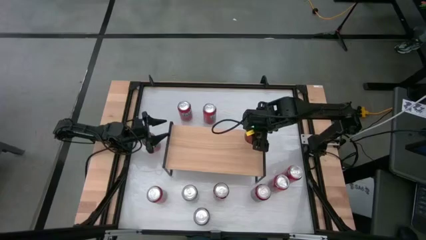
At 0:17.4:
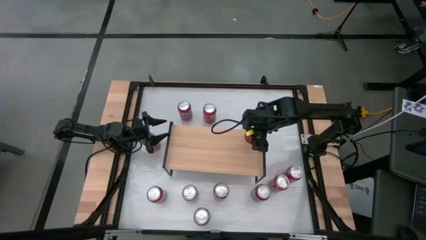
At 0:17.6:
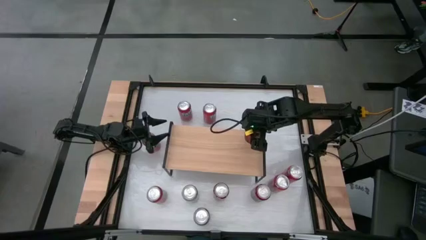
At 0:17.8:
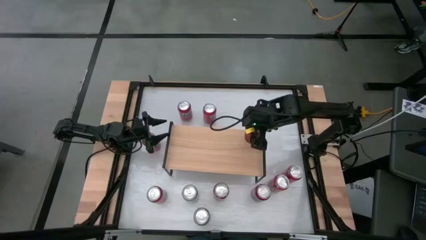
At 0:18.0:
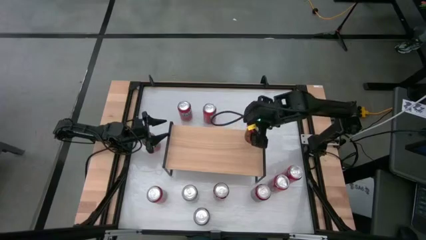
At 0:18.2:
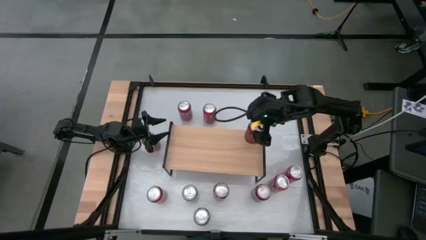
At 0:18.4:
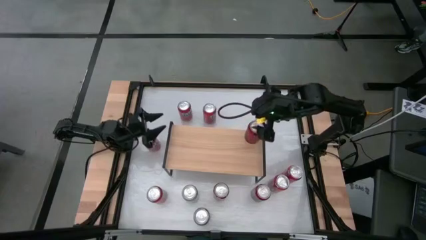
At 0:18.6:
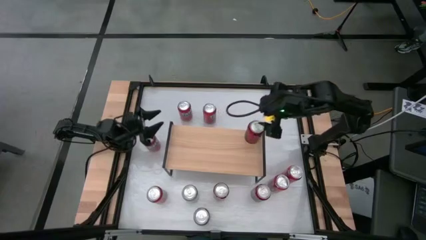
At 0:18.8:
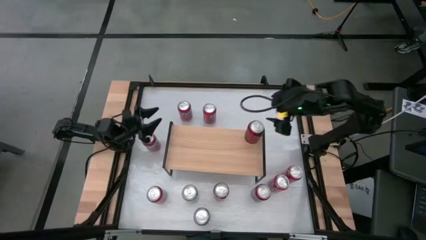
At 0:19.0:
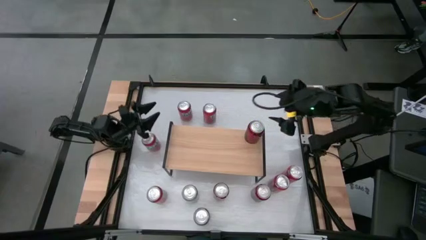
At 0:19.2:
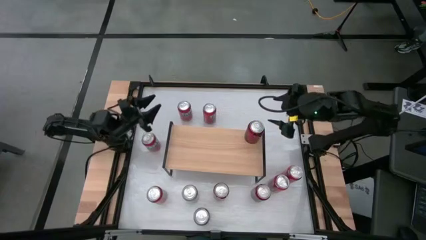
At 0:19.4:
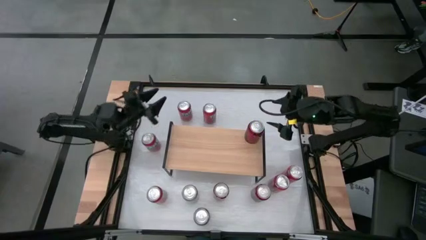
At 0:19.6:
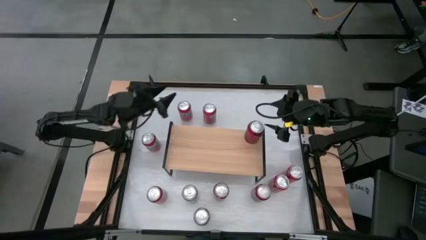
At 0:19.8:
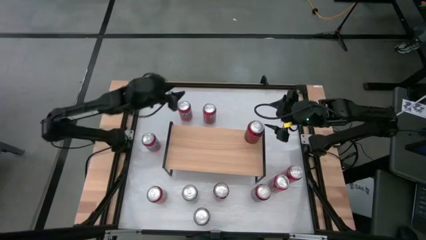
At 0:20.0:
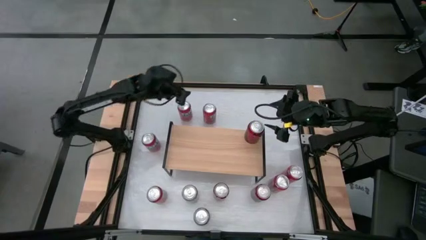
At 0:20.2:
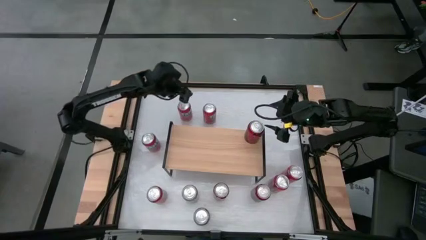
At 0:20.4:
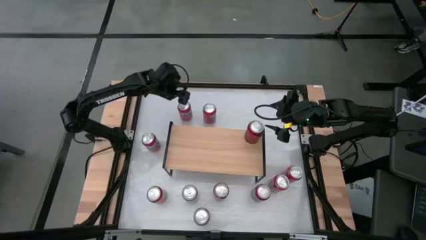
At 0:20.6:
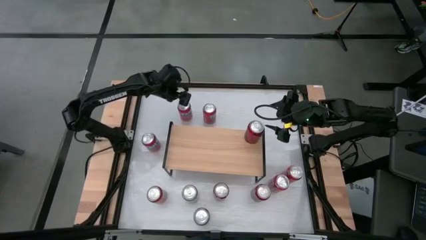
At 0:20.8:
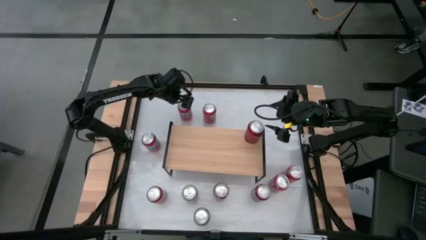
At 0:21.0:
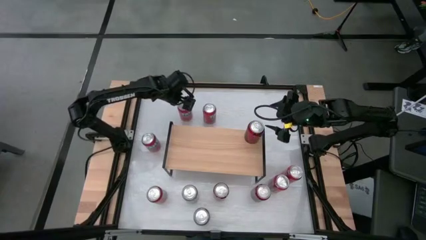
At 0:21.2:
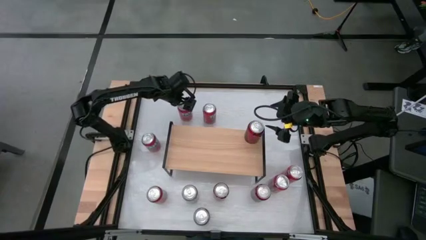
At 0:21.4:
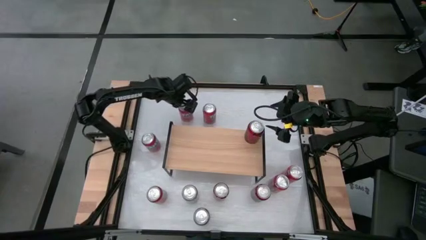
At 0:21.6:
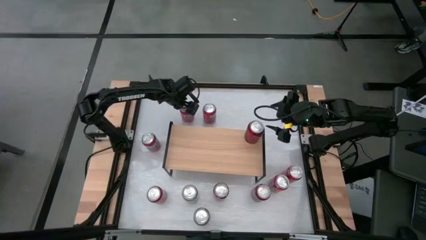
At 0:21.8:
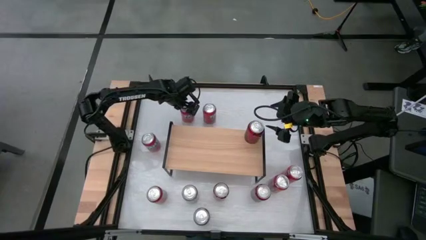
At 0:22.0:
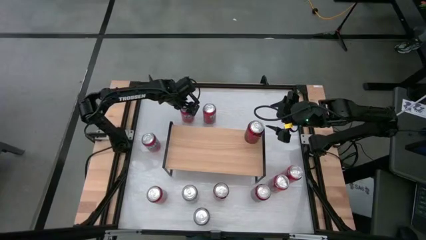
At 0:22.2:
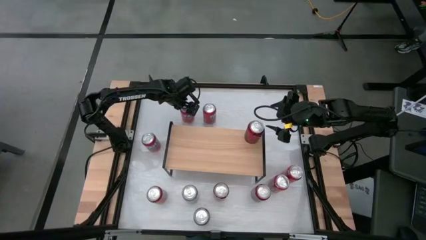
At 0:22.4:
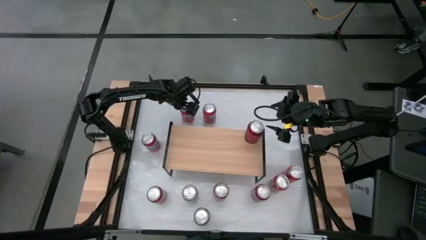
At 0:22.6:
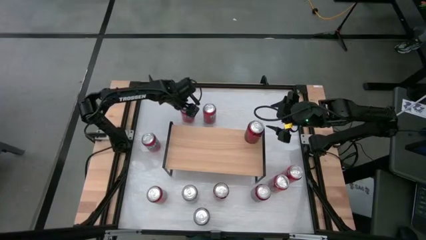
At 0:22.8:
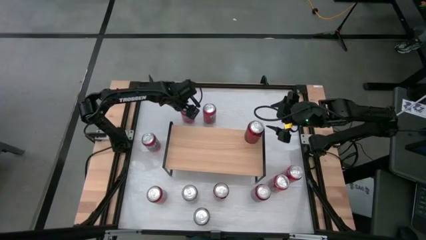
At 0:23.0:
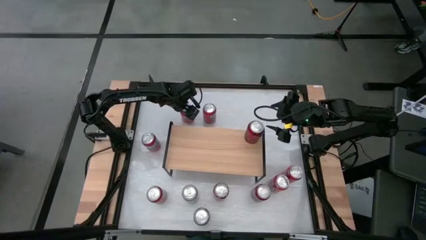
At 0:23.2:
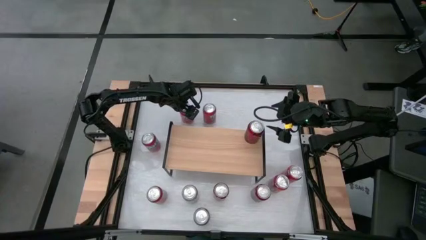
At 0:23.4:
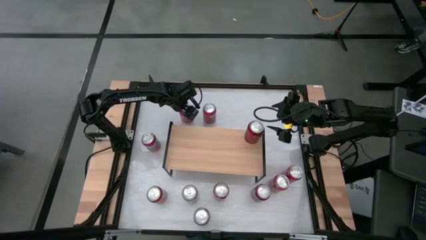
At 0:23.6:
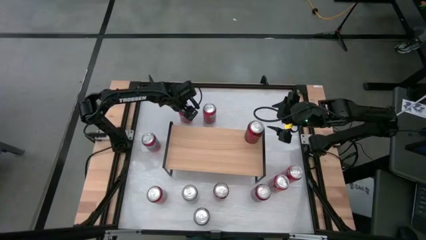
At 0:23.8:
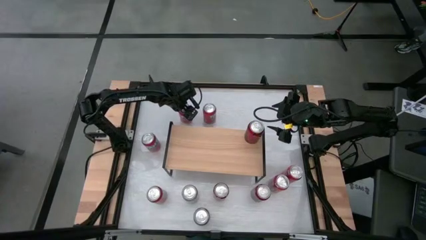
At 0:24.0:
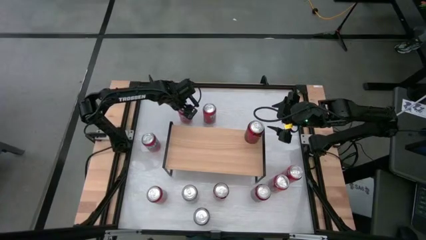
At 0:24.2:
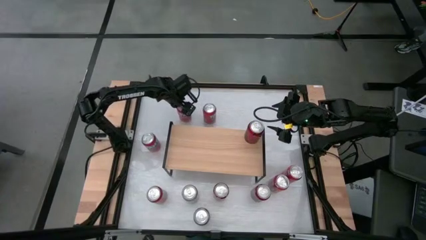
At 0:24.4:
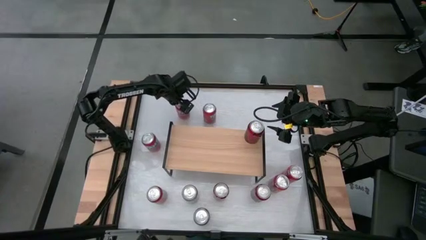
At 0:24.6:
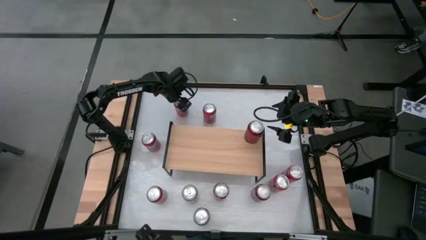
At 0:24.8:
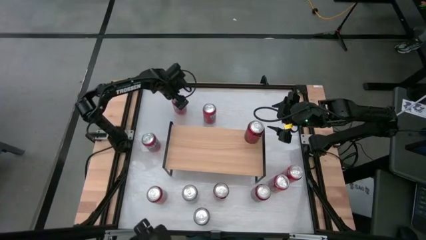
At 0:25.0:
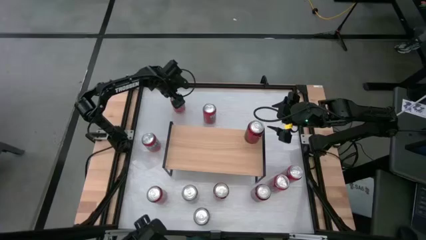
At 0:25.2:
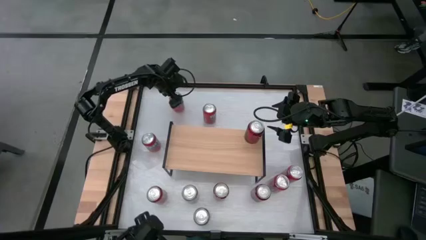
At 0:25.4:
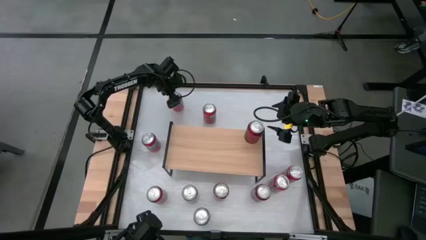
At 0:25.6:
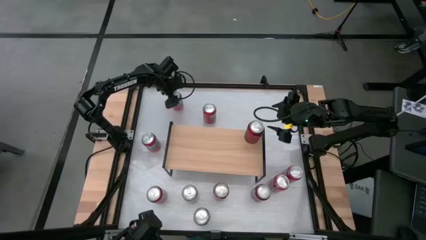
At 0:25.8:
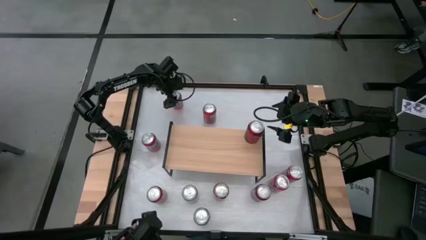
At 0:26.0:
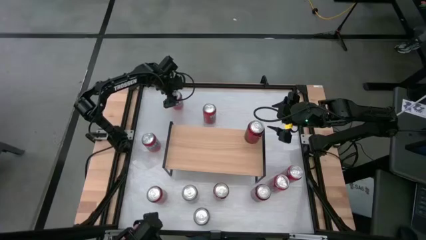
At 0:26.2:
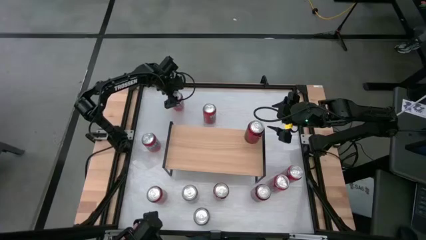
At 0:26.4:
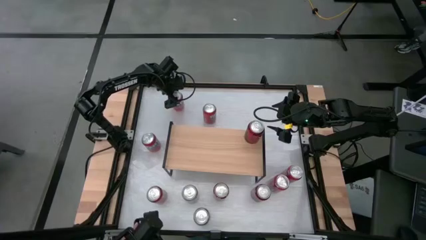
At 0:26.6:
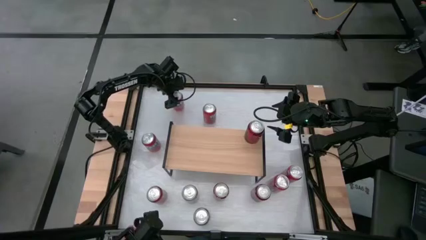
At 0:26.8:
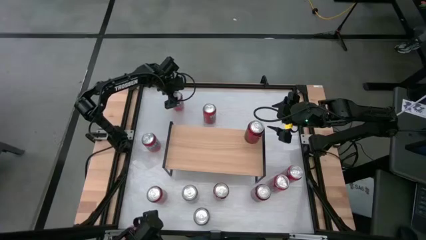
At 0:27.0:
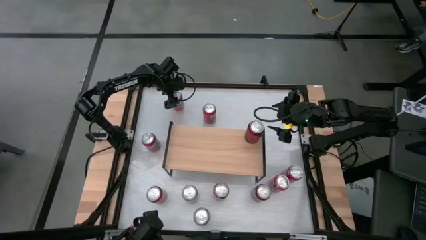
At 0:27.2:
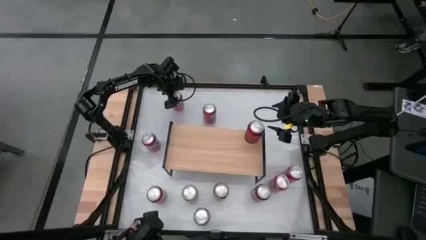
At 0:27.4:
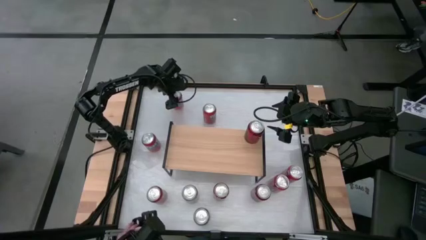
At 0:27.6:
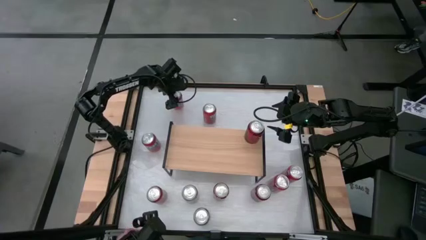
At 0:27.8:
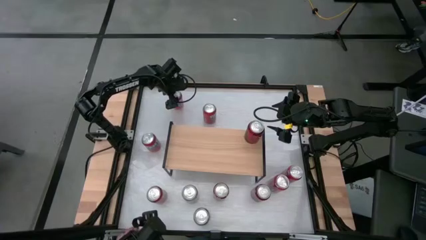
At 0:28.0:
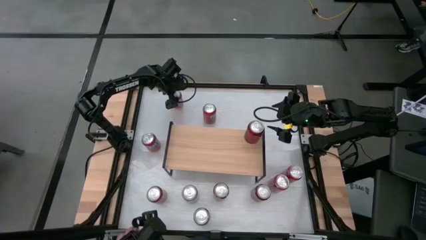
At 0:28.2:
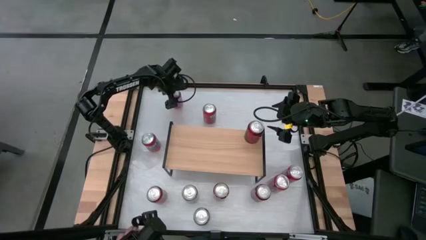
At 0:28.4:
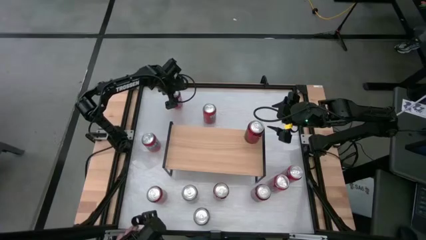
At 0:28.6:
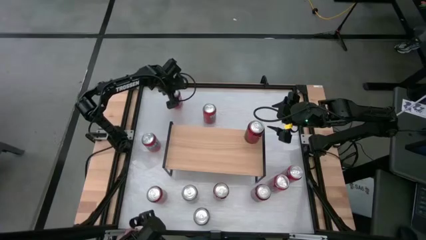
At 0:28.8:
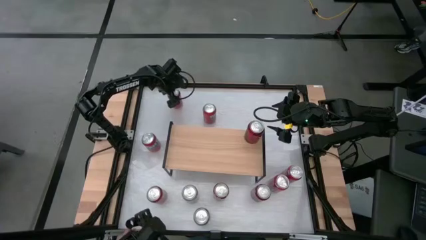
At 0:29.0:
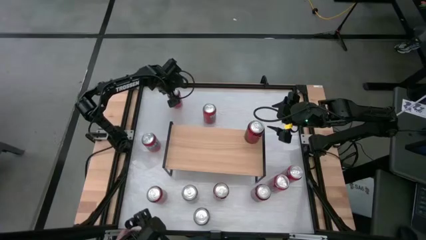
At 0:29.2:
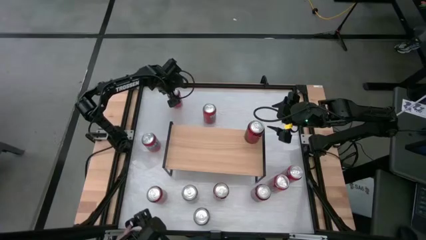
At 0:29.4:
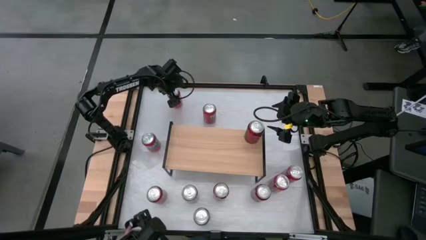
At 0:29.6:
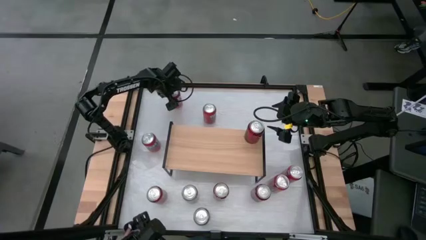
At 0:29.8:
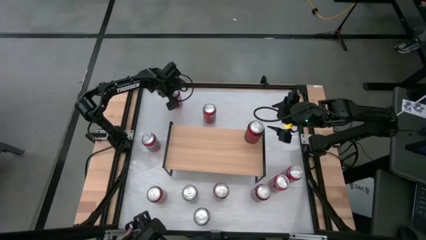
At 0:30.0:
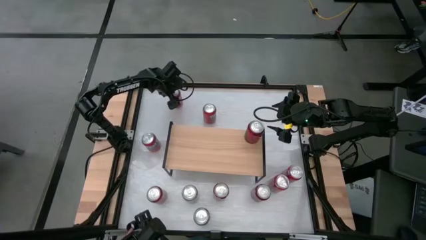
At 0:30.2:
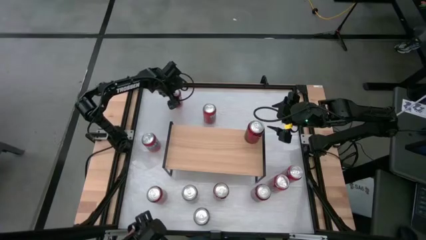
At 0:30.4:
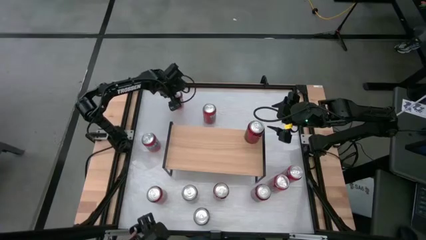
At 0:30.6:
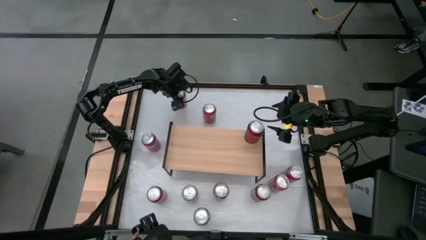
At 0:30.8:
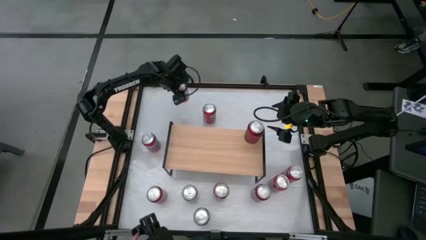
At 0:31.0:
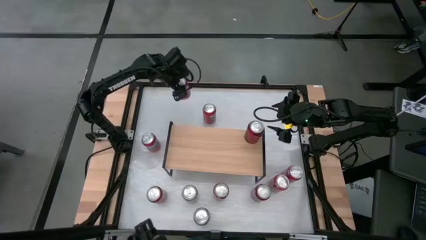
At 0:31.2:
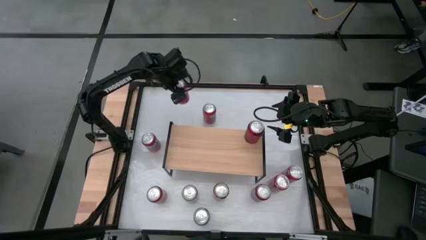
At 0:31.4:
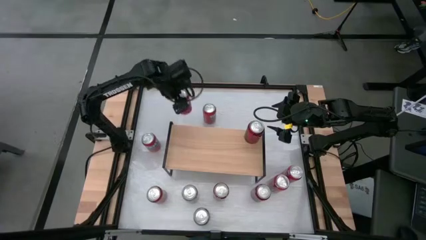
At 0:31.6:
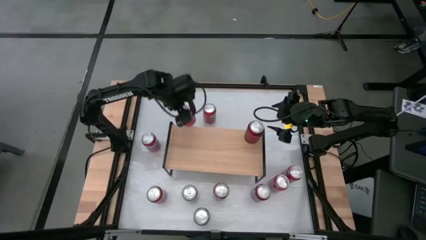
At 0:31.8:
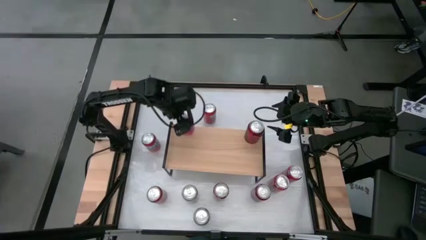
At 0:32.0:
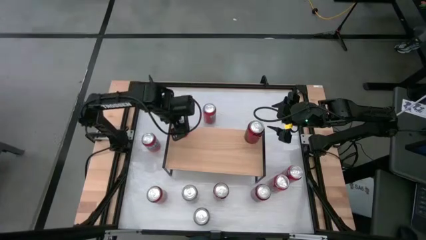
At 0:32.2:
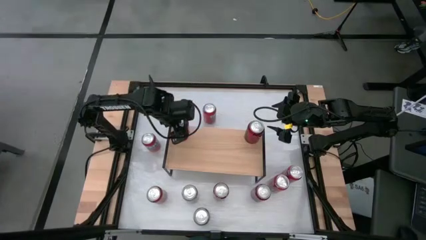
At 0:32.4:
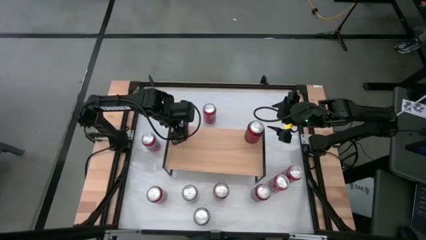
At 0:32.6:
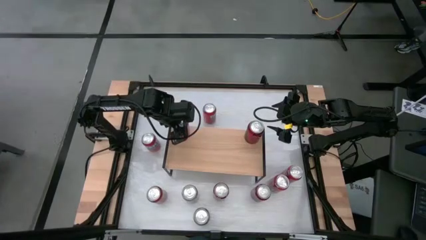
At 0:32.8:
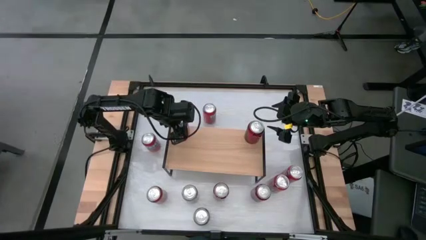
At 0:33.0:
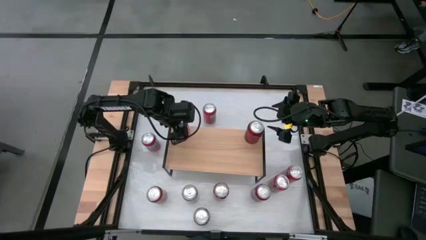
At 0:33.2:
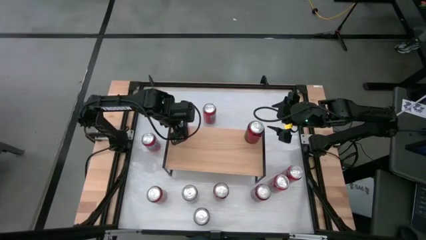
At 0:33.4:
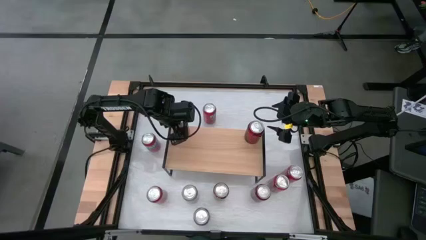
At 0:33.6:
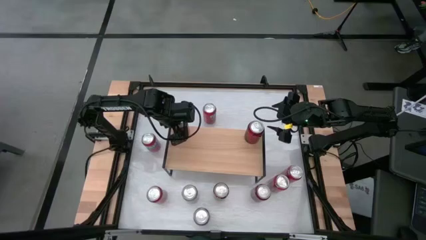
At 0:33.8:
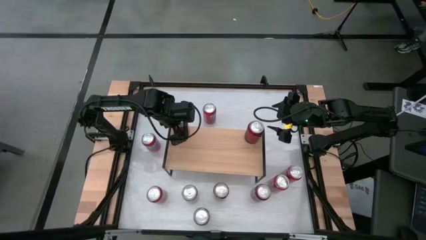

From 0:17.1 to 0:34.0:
Task: Place canned beverage on shelf
Put the red soda can on the shelf
